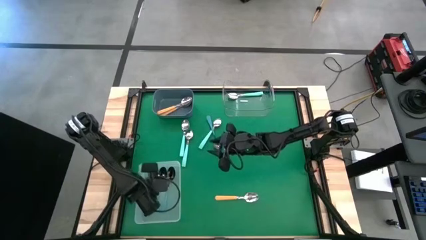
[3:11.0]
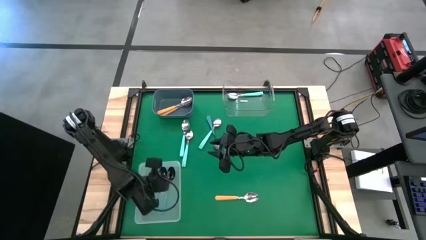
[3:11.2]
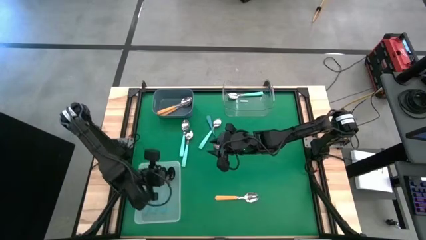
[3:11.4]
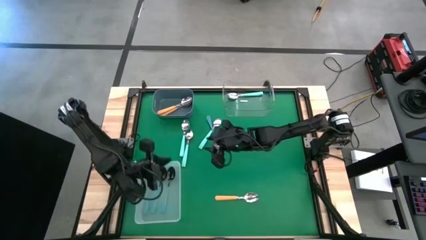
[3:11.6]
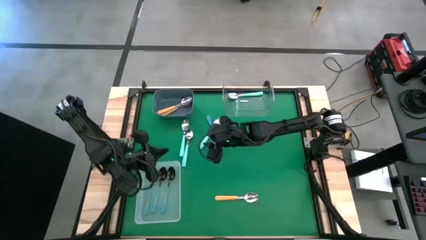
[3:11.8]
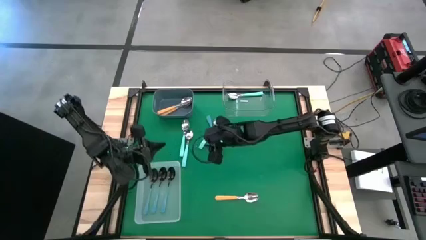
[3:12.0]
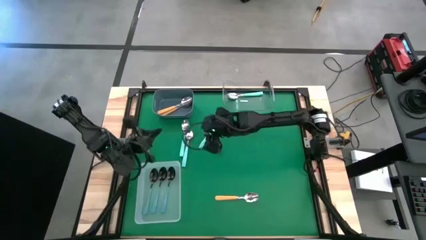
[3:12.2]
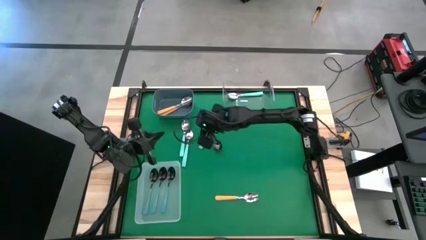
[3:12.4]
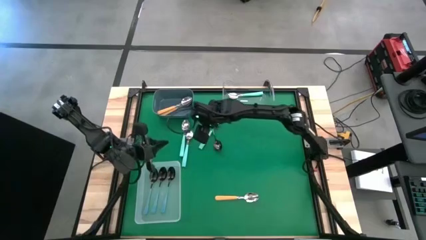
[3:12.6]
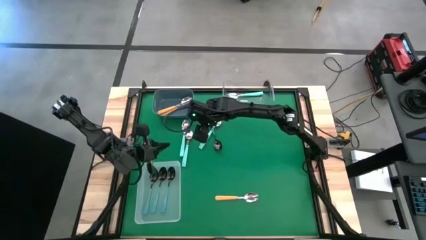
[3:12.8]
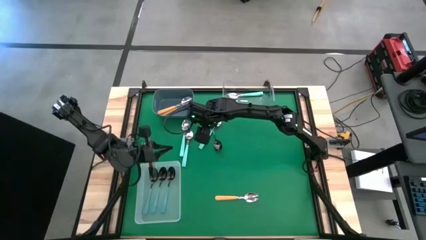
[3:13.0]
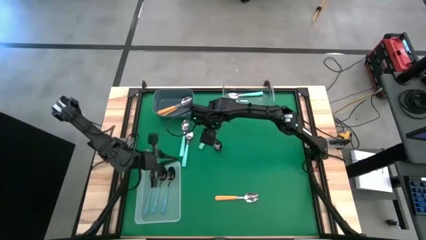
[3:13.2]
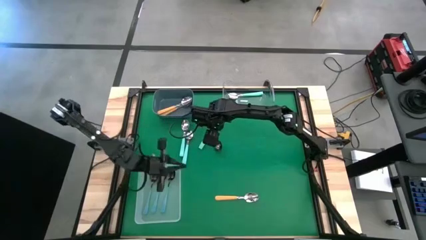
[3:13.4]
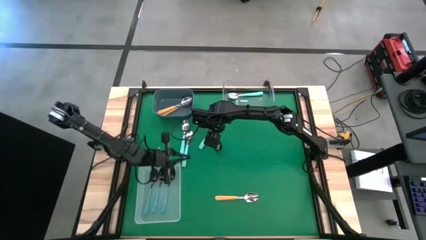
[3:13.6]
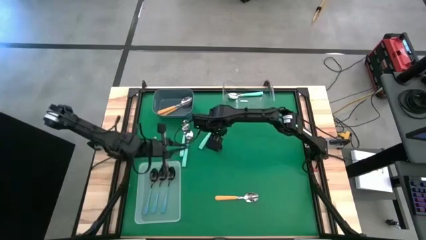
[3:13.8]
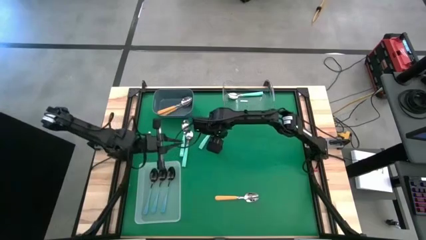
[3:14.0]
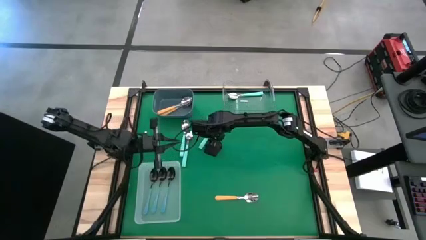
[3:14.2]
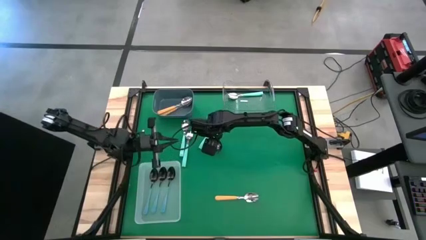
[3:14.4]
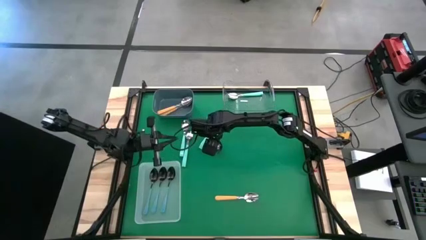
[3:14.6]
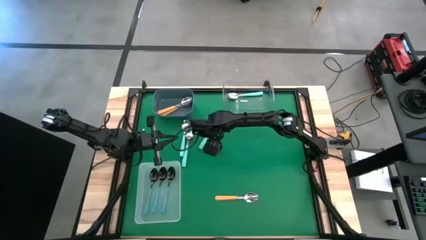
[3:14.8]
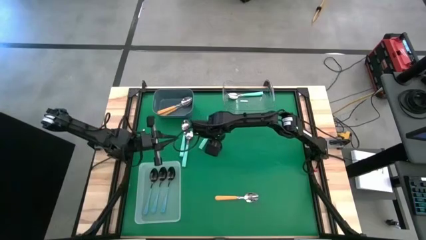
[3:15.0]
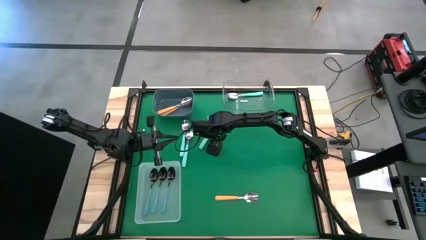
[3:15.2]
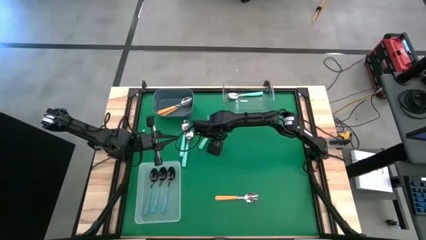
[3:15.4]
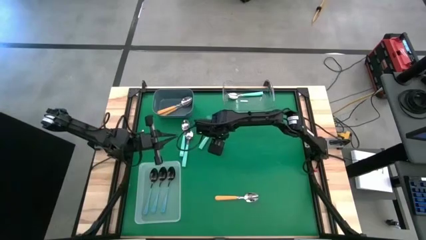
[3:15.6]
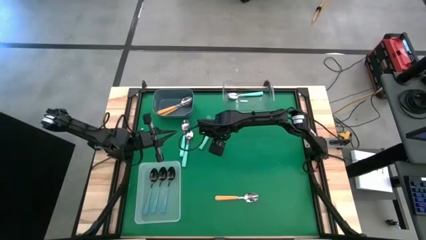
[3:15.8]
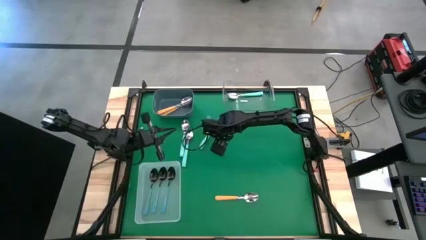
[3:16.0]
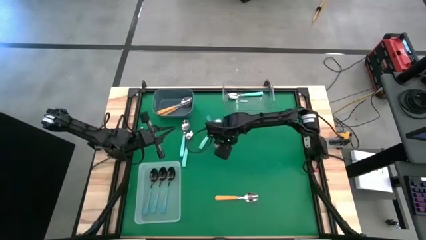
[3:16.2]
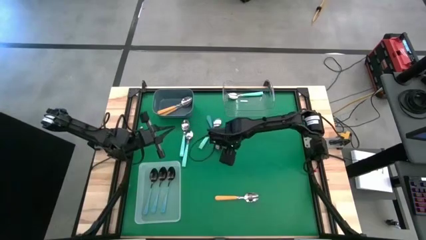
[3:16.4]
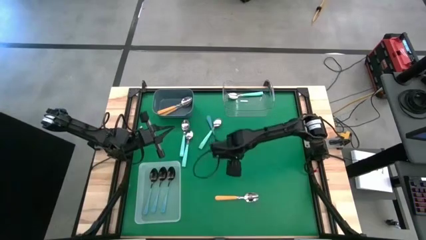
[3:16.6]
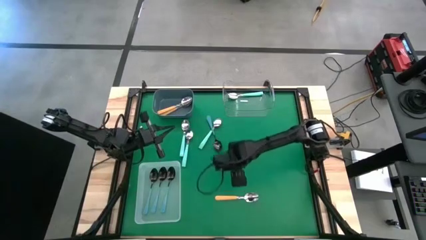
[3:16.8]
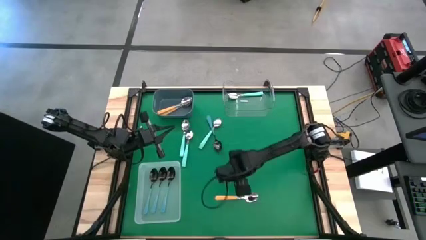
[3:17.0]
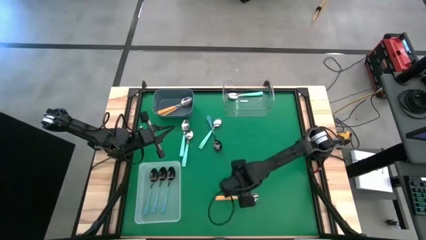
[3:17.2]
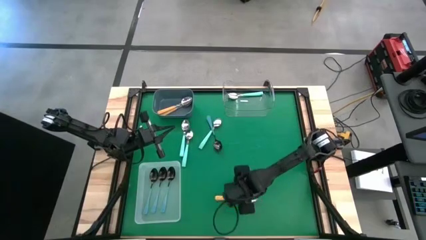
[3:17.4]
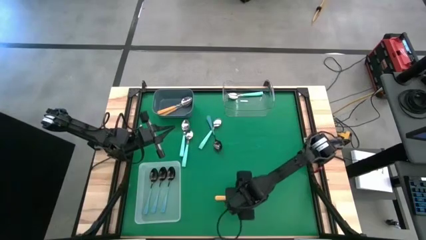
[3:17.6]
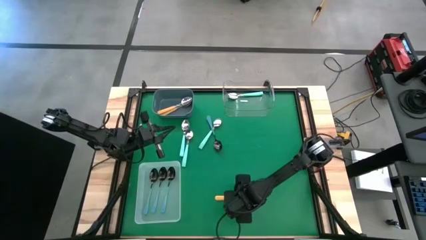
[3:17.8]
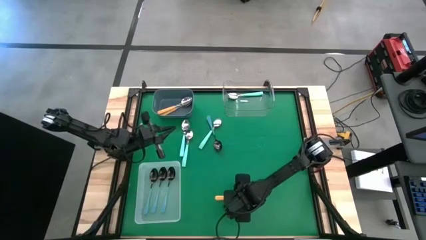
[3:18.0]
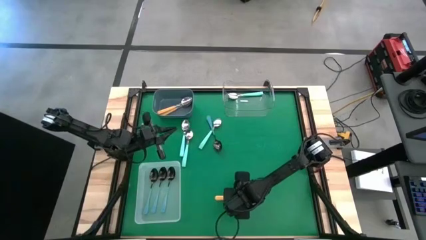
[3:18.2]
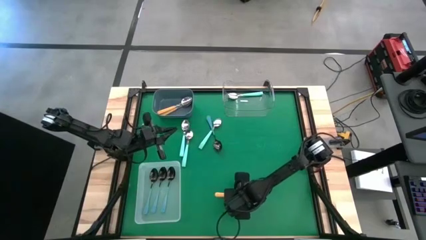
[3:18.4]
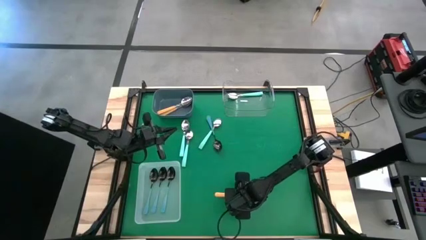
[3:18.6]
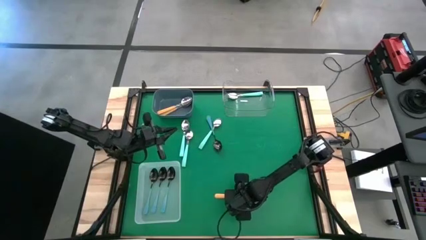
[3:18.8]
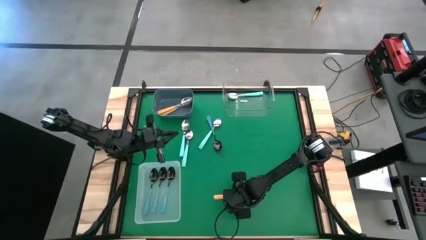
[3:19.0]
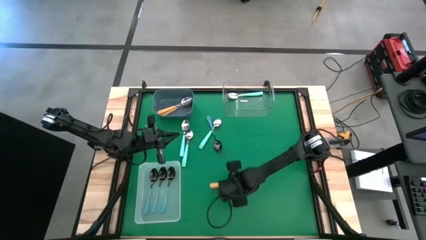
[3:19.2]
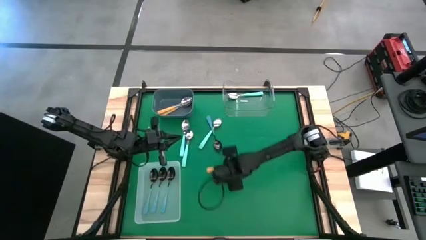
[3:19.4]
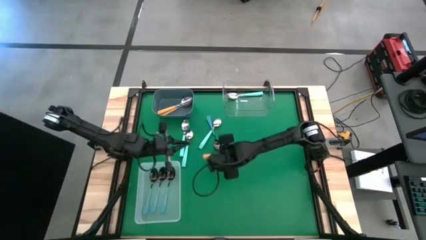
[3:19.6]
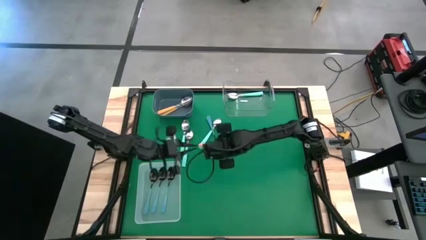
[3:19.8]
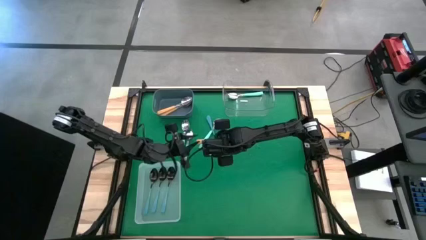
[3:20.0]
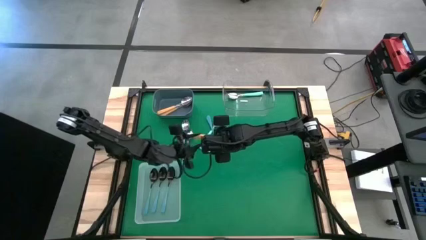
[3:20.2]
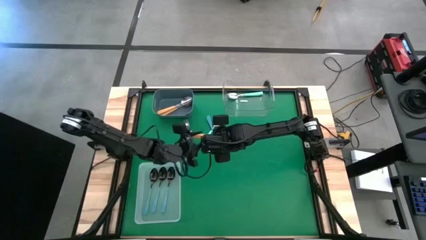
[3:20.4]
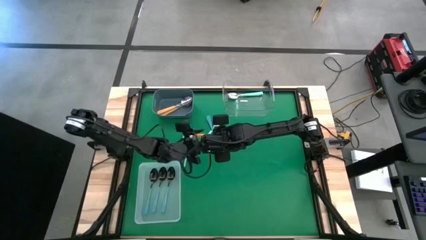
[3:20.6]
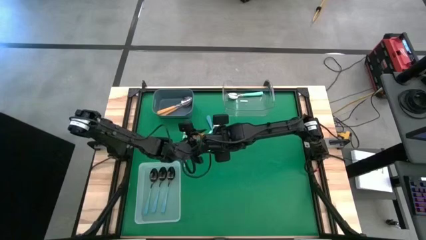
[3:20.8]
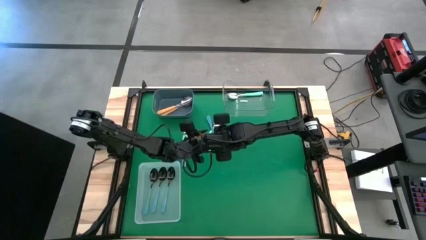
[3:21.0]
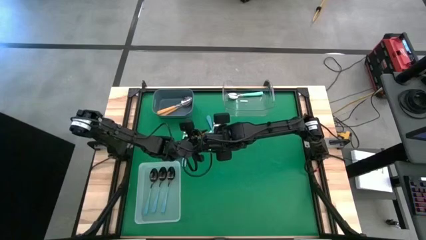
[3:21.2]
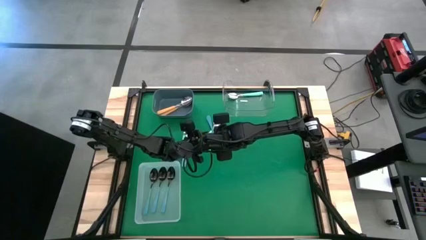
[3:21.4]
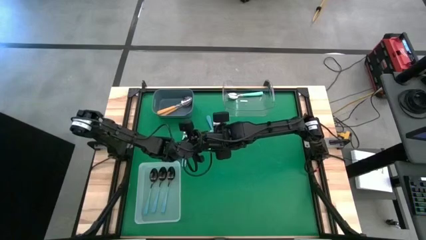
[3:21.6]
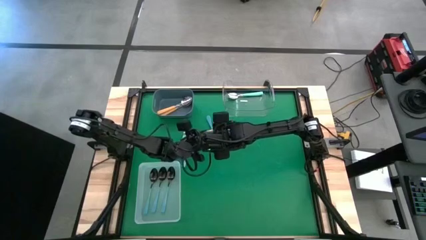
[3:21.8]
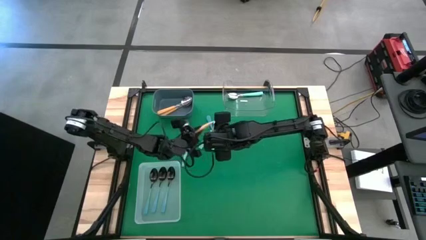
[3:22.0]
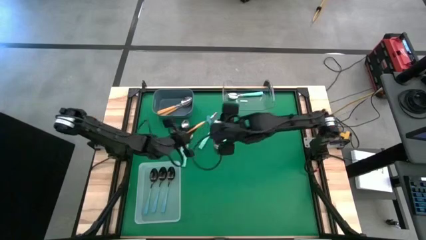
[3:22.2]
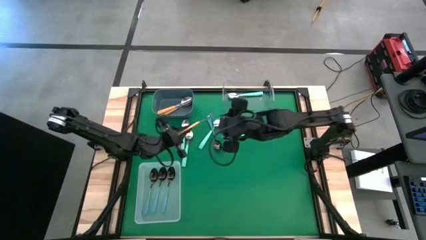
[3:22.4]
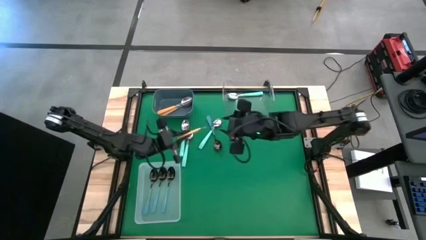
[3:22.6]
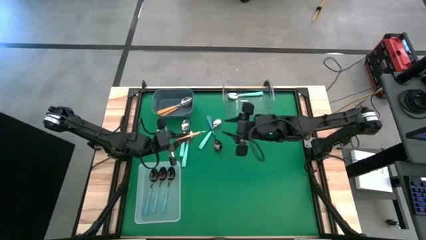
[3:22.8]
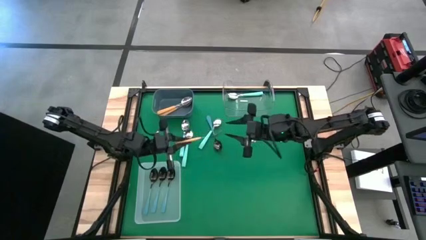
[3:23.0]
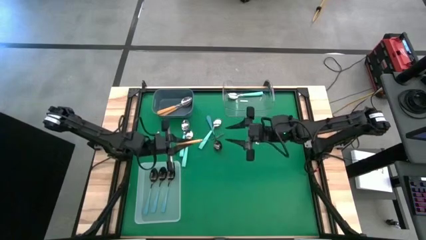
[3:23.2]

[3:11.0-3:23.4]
Task: Sort silverware by color (type)
Put the yellow spoon into the gray bin

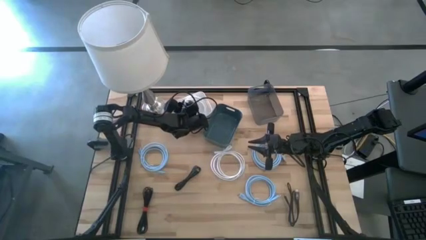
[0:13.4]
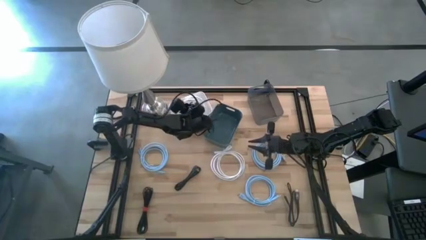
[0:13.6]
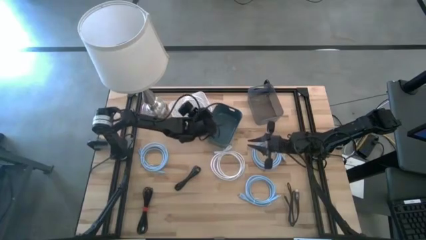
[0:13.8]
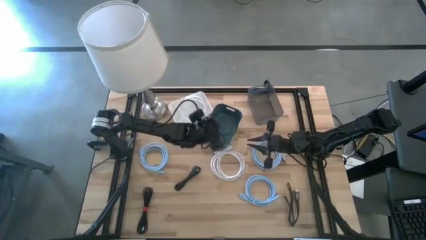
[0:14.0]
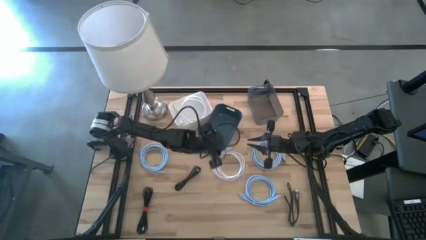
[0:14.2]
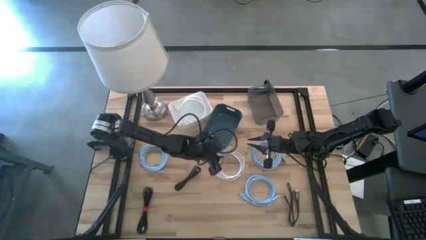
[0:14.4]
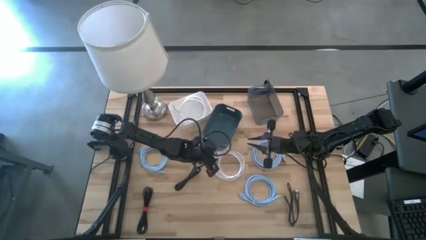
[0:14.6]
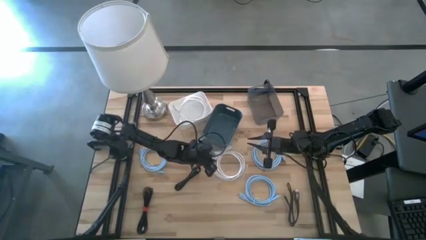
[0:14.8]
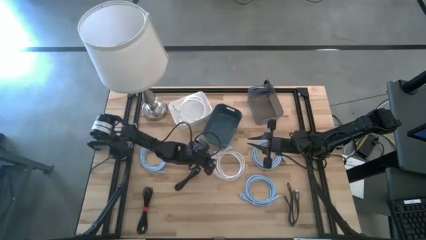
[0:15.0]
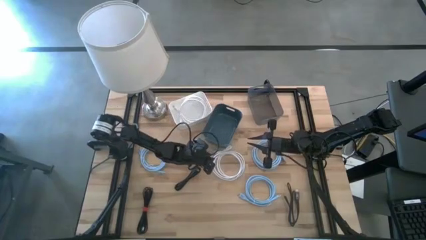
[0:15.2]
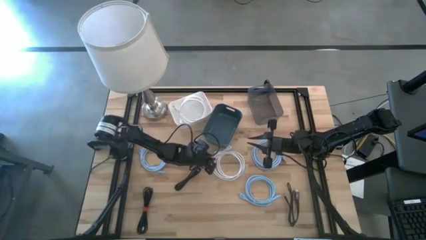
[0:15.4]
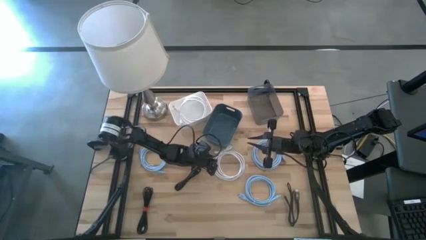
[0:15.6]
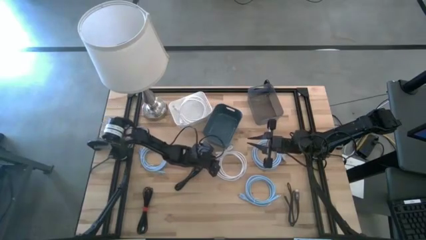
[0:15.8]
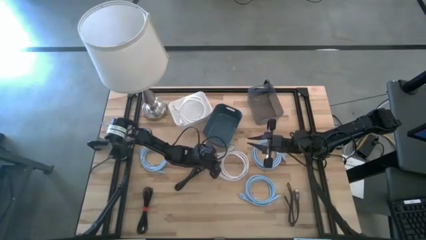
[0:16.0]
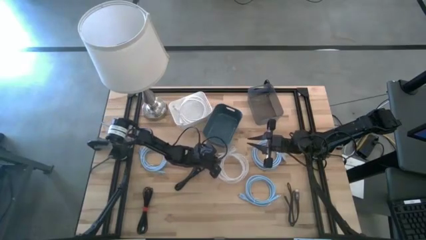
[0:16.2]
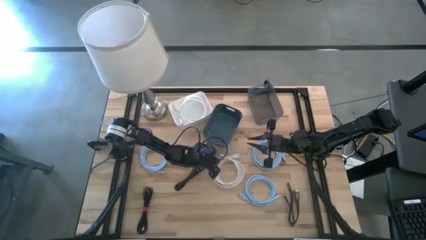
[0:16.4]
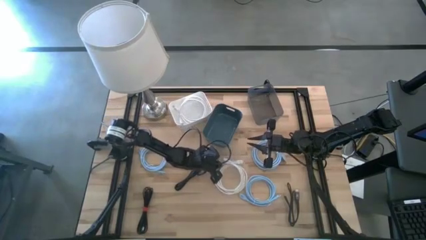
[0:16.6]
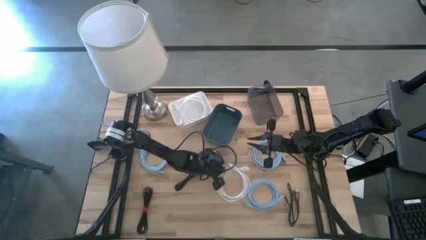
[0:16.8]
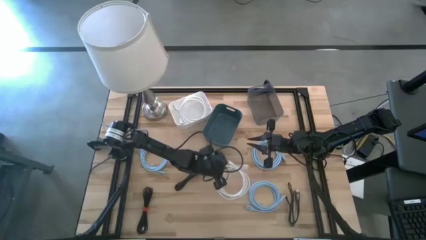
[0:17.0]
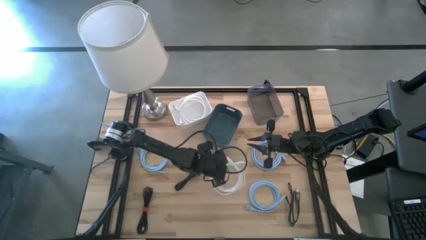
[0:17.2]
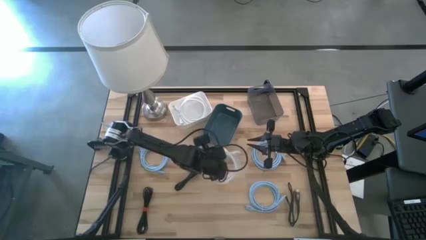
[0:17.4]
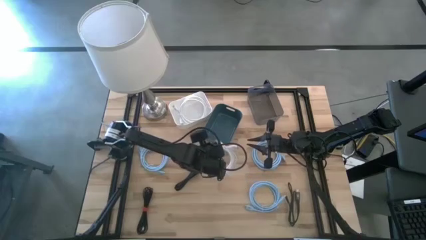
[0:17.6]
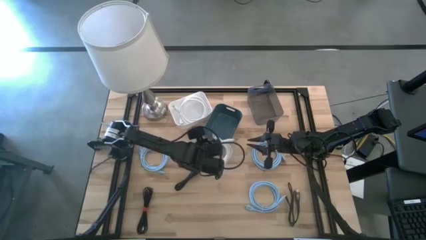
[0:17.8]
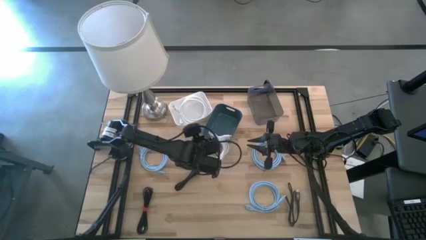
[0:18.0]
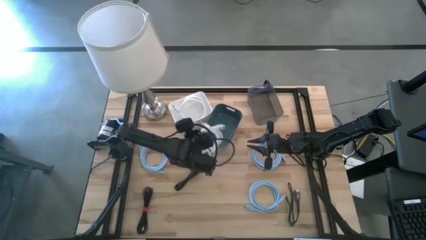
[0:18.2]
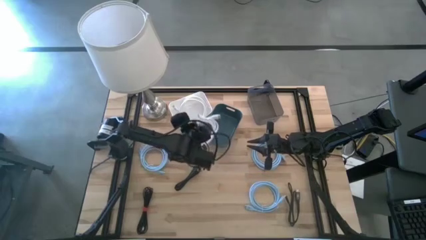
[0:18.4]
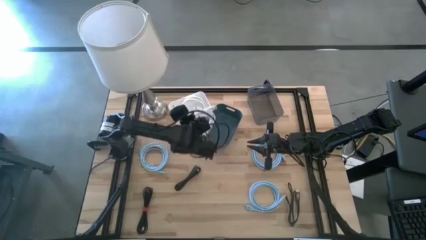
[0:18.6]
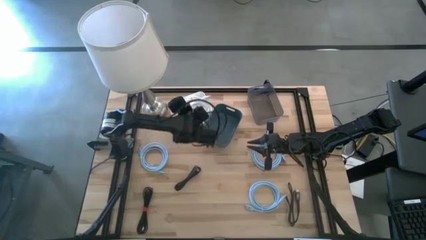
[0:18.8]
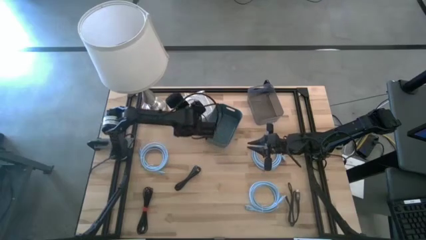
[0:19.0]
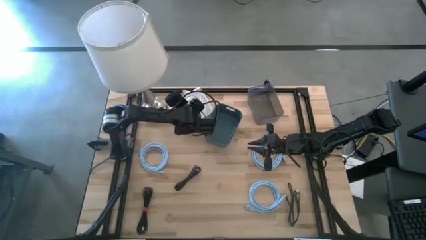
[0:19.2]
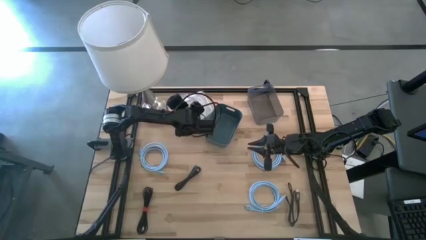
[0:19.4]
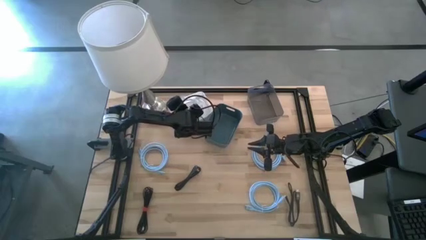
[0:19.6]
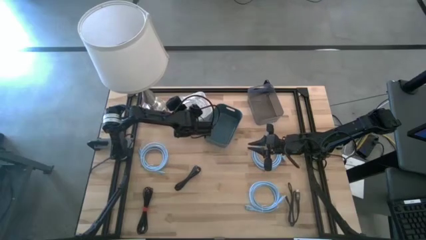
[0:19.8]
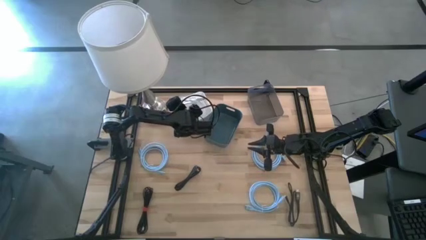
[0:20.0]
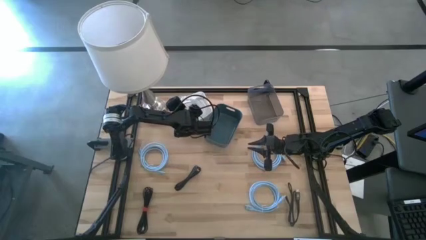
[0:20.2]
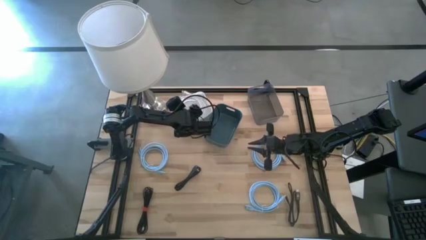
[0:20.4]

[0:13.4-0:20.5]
Task: Sort HDMI cables
Put the white HDMI cable into the white bin
